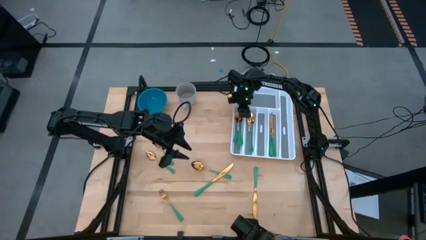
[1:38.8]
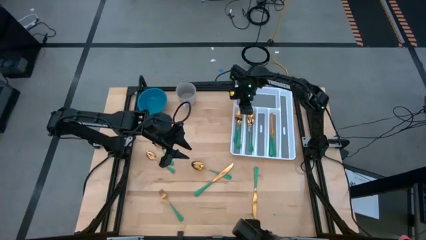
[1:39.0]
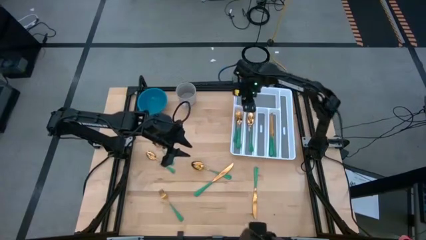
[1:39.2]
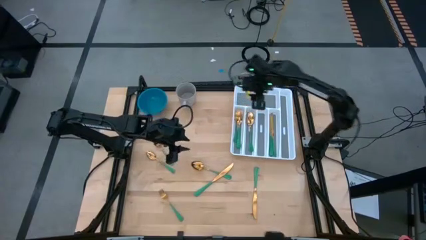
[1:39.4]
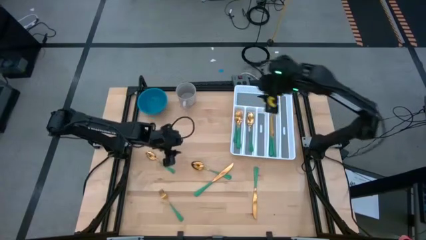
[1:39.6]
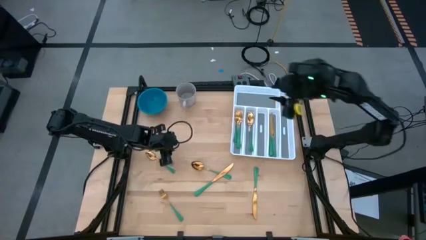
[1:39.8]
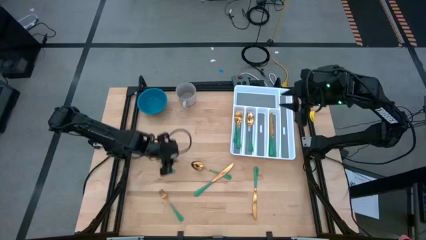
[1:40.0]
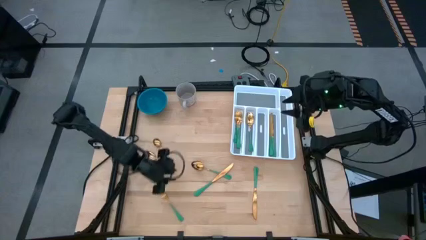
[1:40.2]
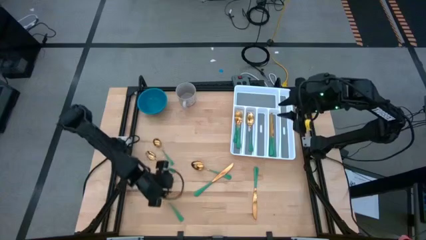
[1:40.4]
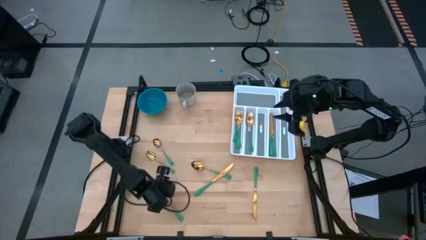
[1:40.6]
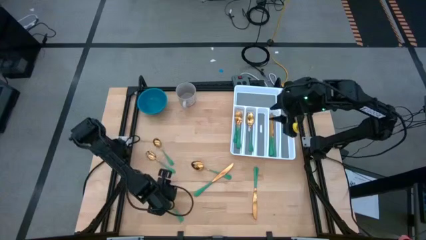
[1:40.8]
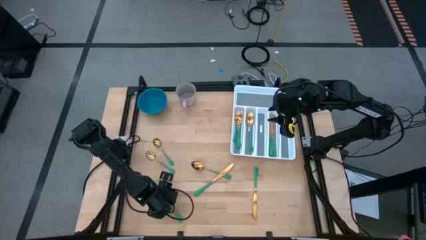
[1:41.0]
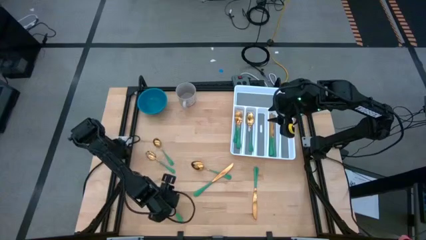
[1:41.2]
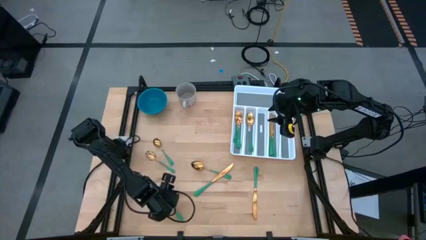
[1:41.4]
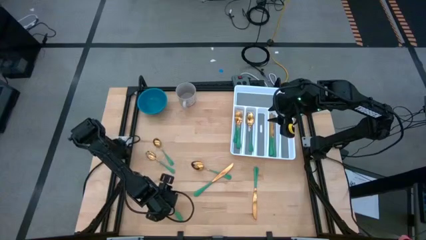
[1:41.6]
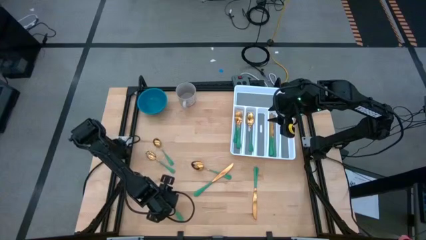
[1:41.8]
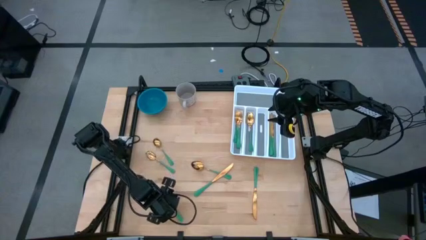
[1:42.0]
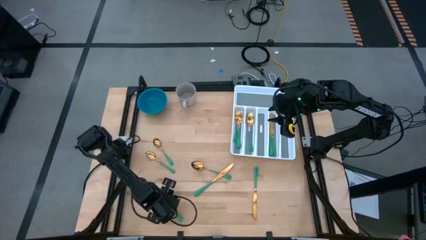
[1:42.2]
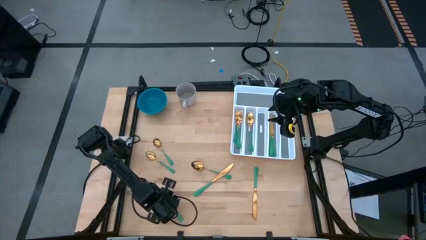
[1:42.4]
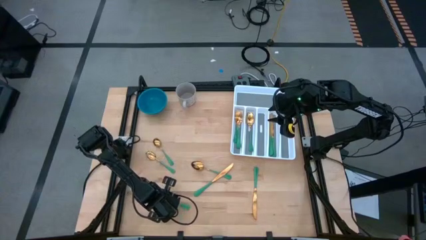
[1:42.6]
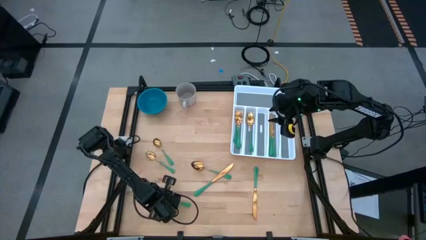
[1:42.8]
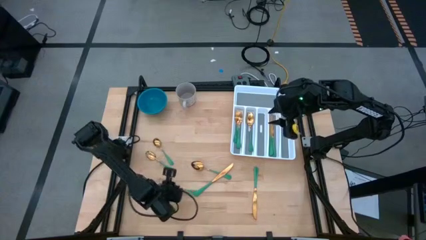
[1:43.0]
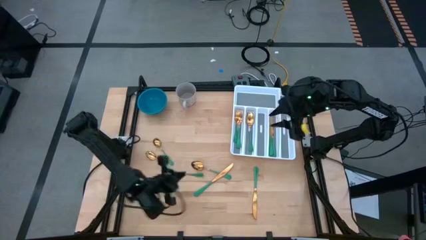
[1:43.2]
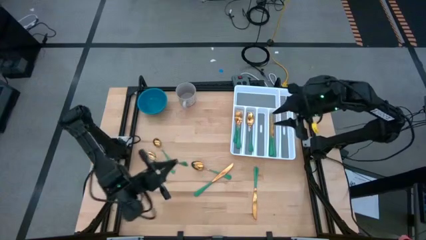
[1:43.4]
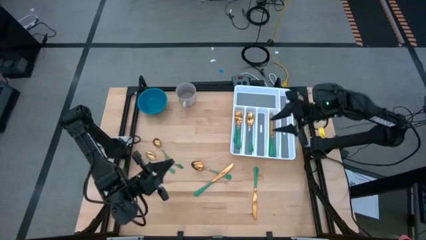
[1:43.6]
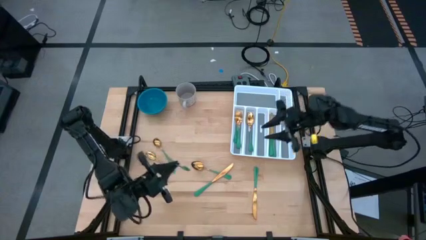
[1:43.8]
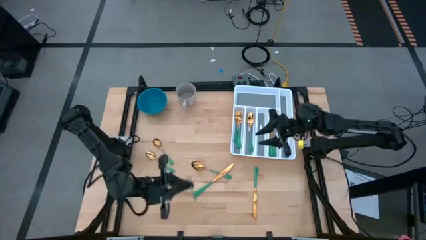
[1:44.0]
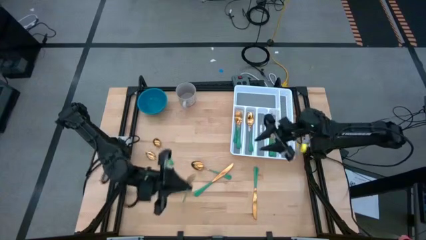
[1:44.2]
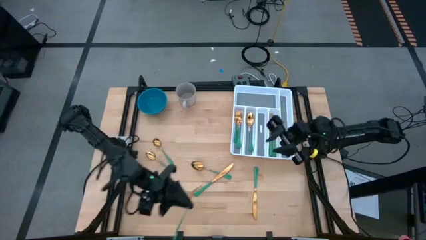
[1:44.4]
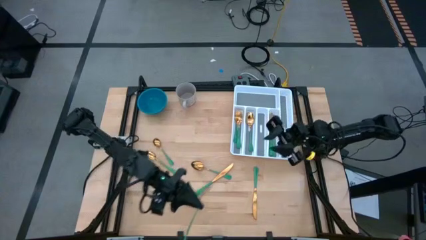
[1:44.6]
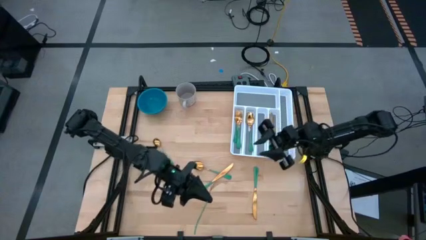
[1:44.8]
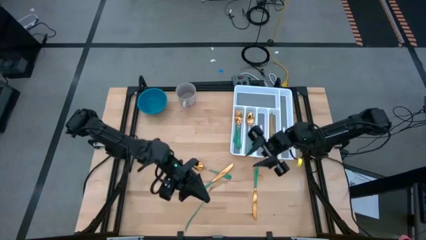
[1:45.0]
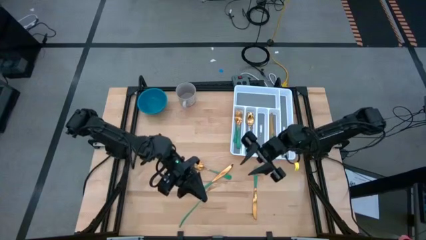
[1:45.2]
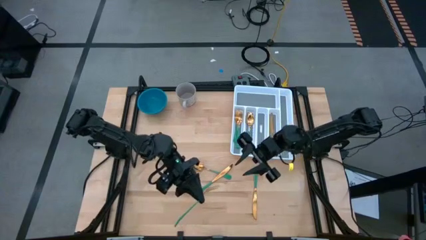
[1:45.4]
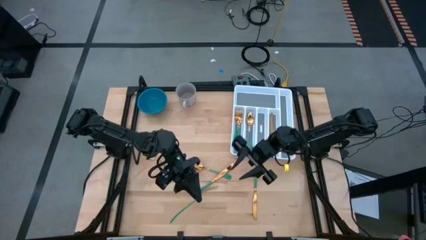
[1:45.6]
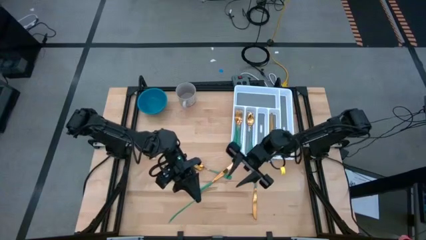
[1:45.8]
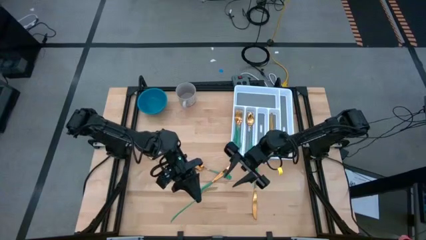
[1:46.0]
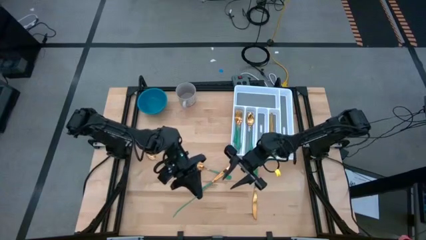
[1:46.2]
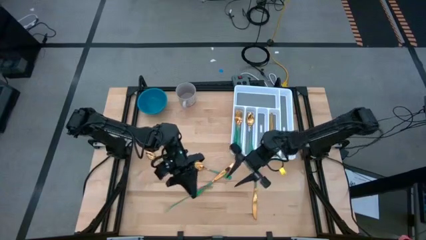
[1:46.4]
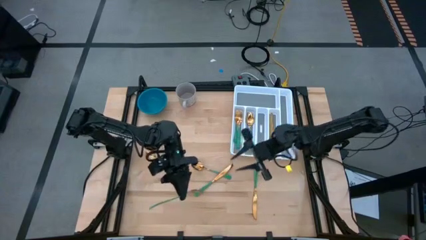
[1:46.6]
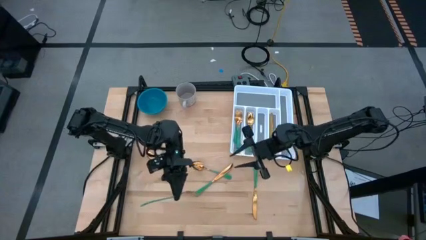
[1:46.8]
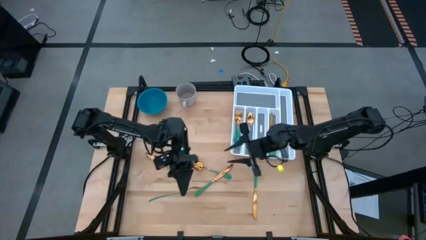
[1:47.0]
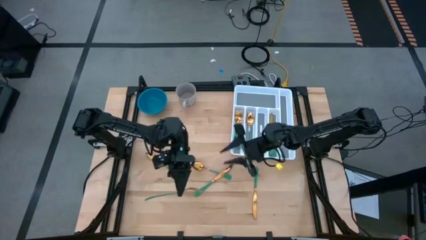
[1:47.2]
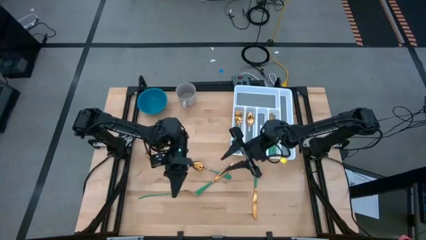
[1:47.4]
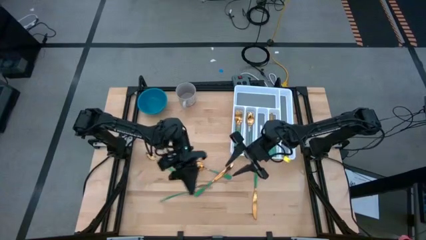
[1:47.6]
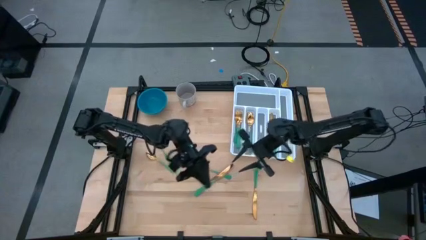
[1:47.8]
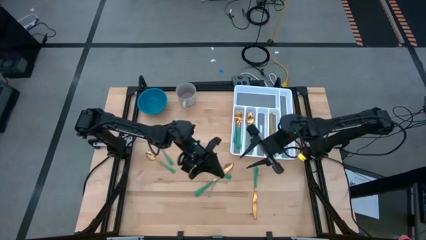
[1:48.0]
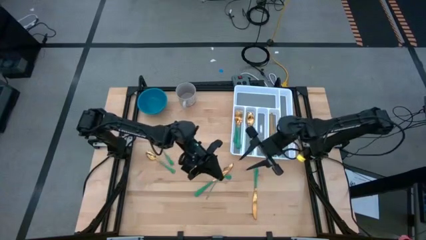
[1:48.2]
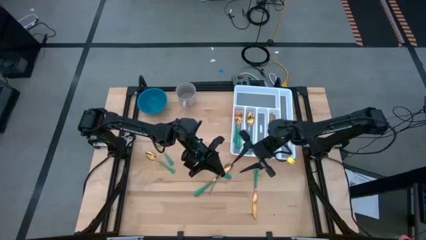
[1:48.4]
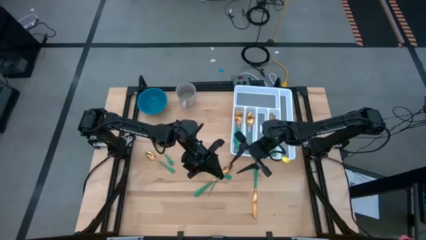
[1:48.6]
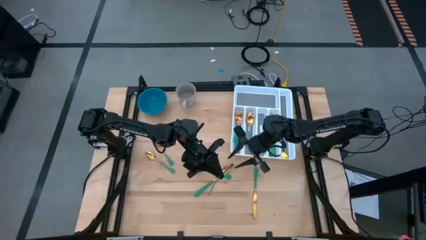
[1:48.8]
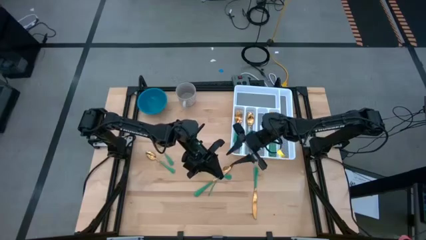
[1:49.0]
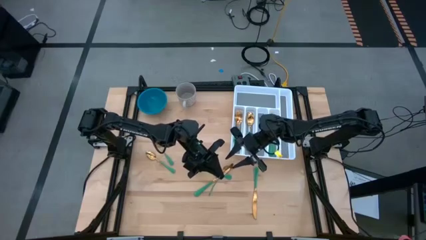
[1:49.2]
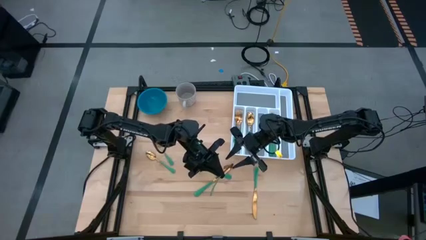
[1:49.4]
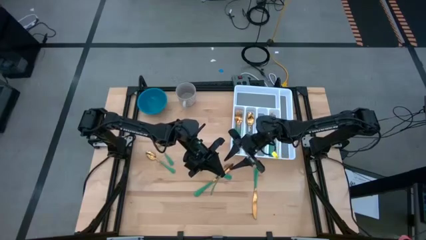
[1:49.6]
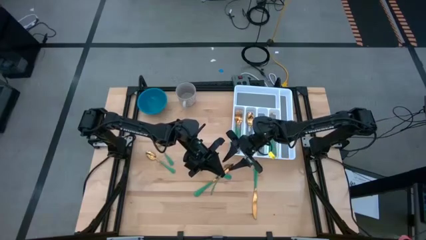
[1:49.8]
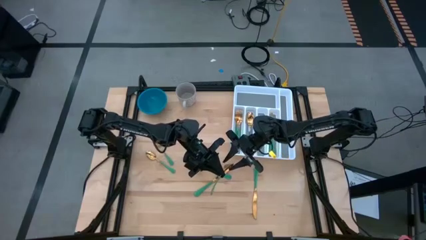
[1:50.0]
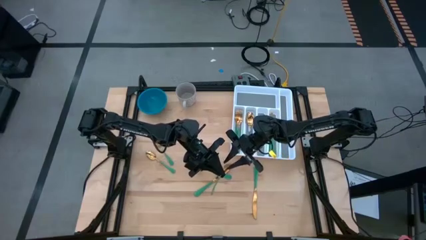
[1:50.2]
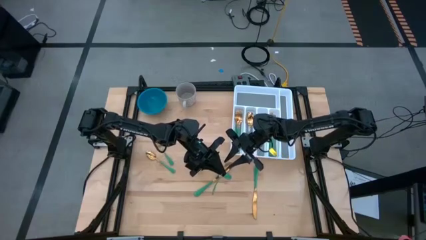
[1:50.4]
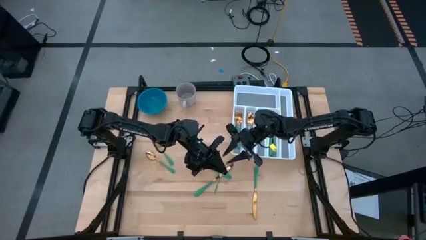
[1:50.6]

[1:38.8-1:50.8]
Task: Sort silverware
Put the green fork into the white silverware organizer

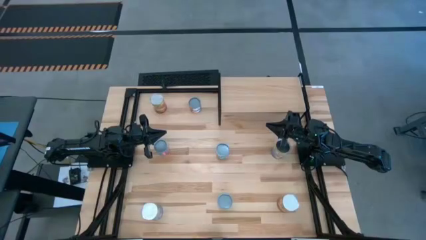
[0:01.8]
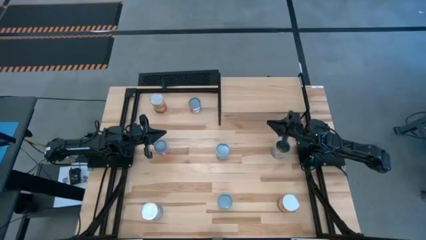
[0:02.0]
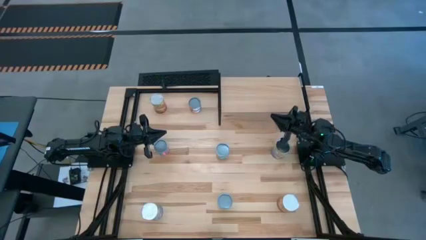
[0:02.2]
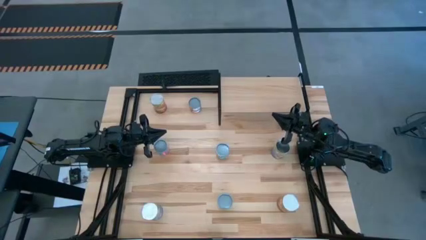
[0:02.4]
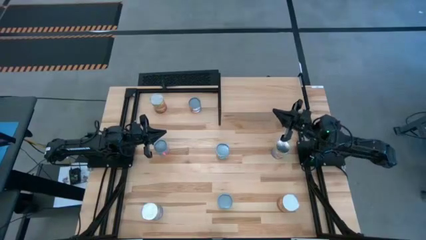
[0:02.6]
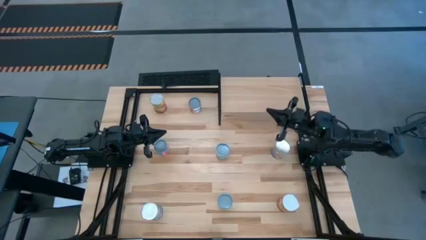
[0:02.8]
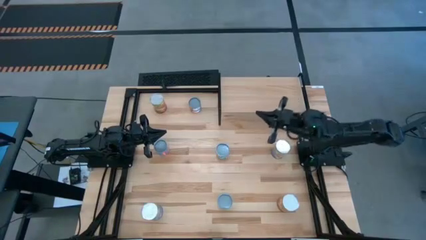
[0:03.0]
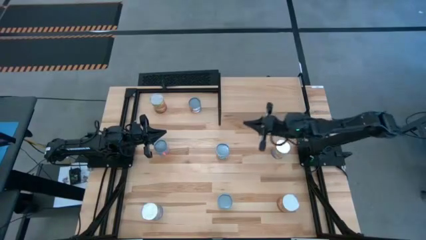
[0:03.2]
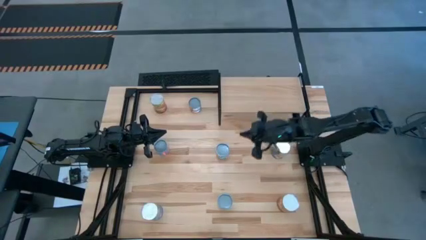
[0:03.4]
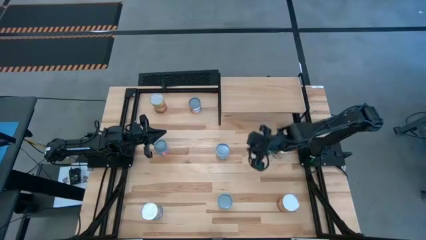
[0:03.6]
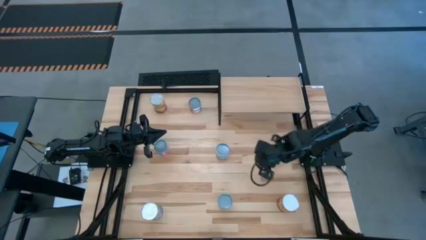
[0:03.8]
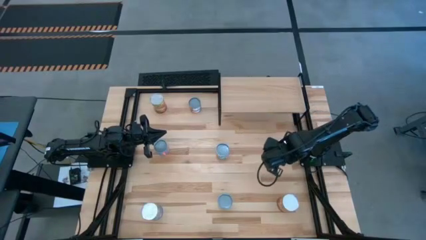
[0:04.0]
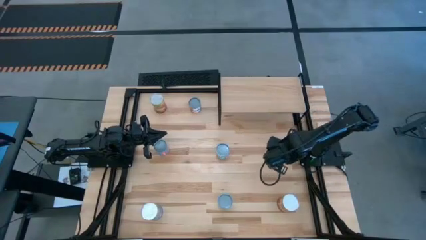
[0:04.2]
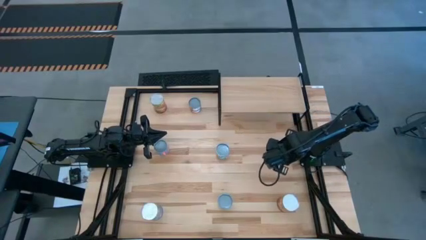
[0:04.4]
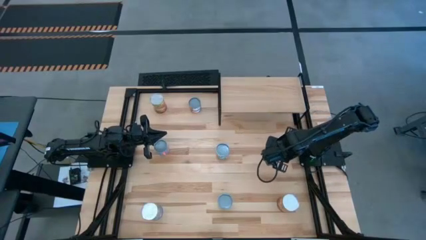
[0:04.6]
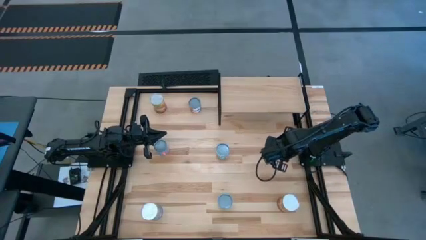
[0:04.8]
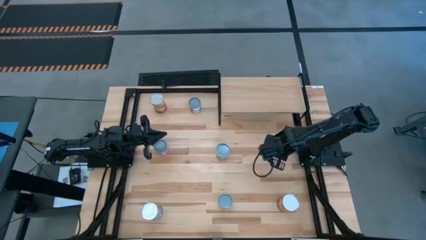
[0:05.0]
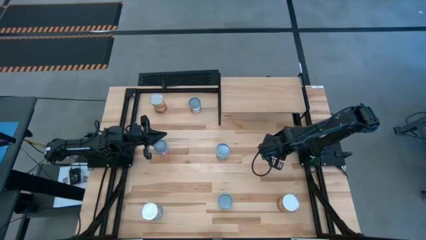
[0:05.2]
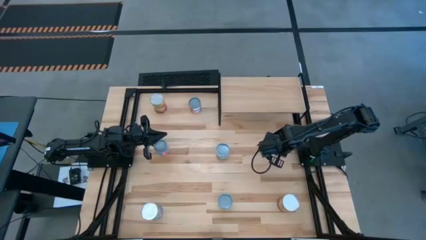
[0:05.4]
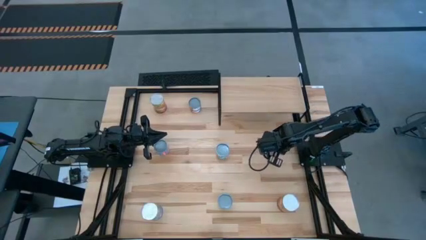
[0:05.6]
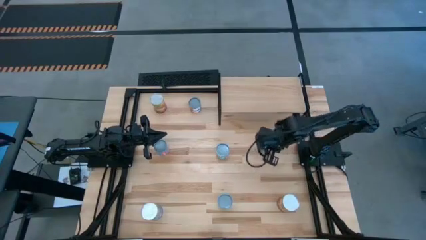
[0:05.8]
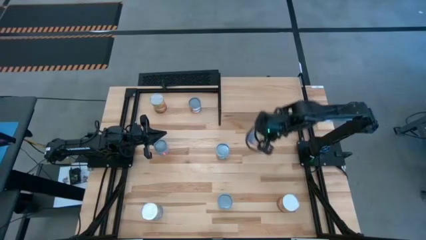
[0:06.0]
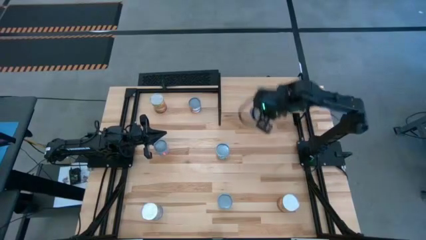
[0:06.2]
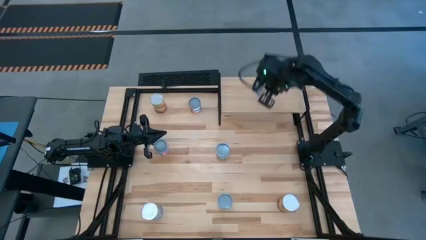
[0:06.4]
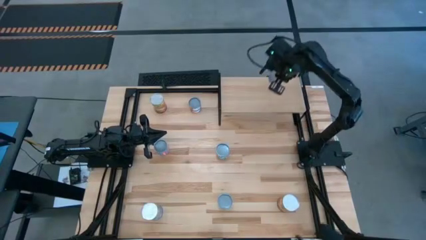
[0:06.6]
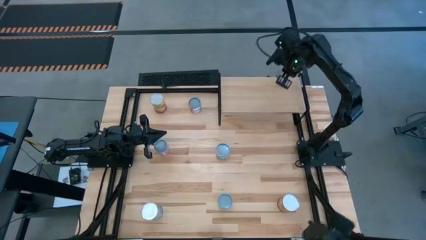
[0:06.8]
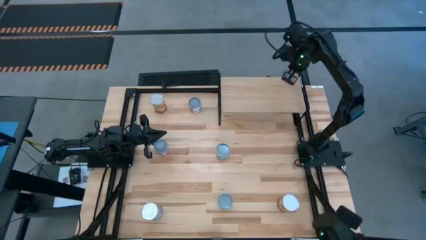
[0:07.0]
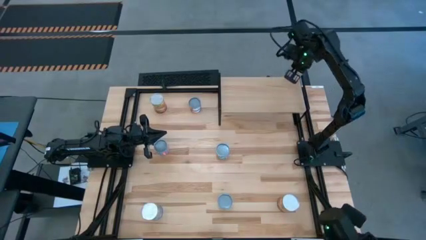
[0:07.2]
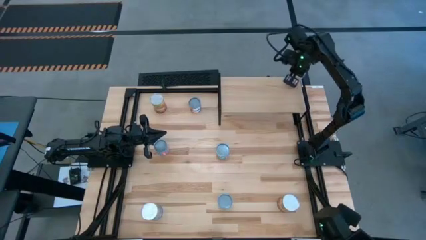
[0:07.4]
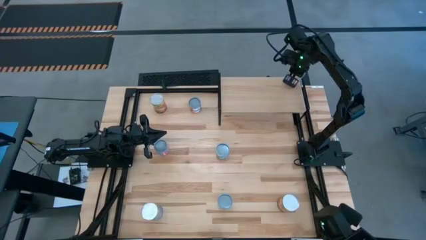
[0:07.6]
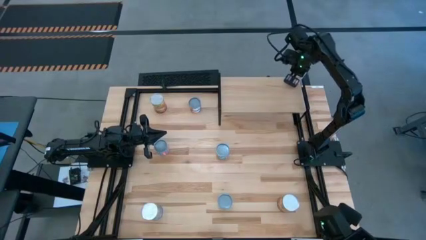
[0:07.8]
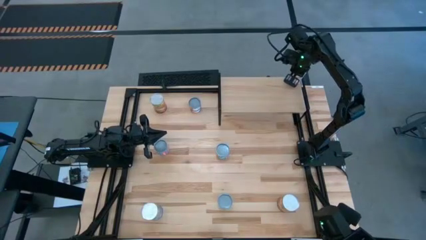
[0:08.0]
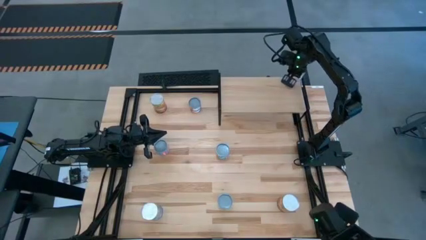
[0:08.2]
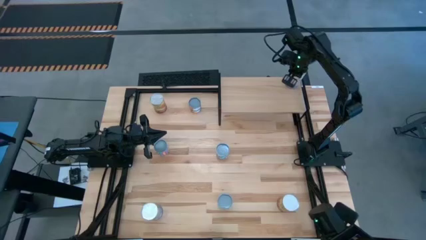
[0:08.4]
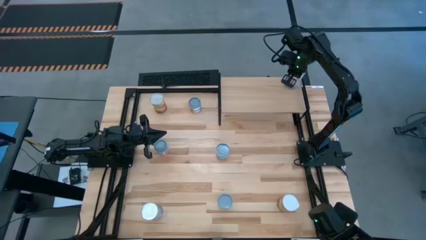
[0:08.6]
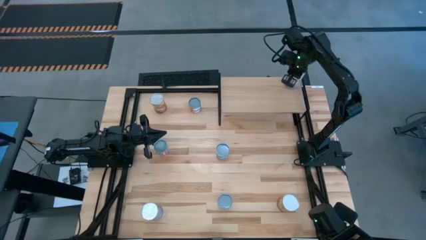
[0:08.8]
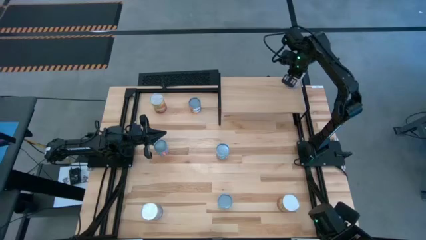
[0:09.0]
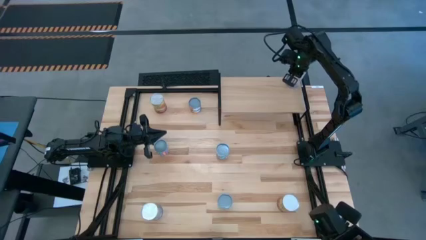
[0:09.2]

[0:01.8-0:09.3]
Task: Pick and place cans onto a shelf
Put the right canned peaches on the shelf
